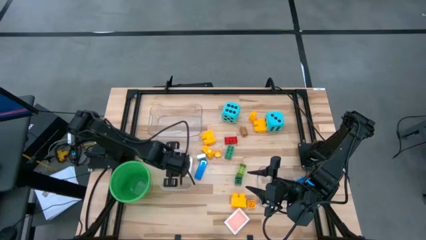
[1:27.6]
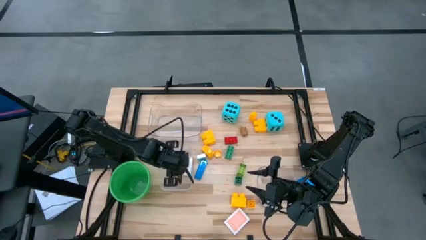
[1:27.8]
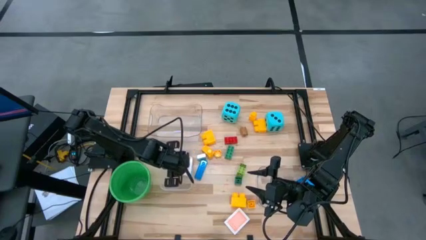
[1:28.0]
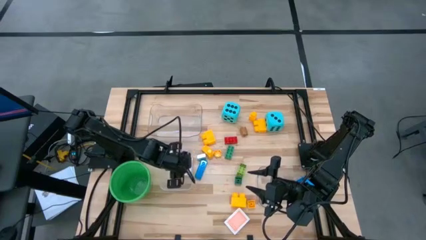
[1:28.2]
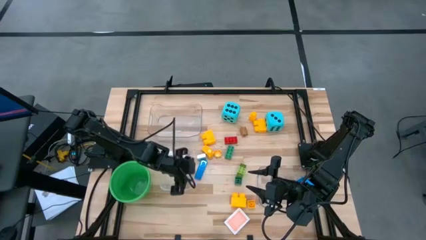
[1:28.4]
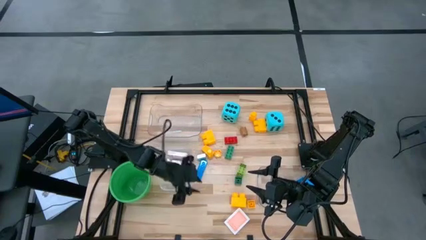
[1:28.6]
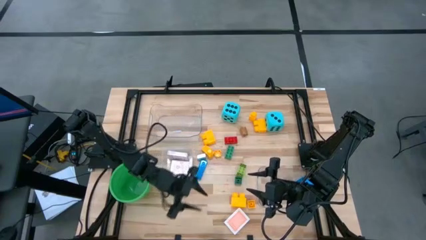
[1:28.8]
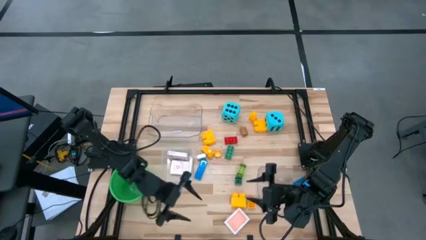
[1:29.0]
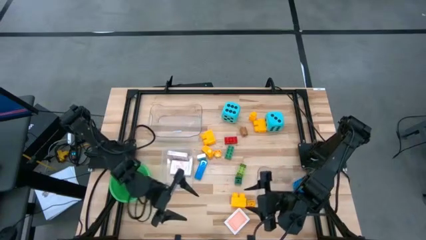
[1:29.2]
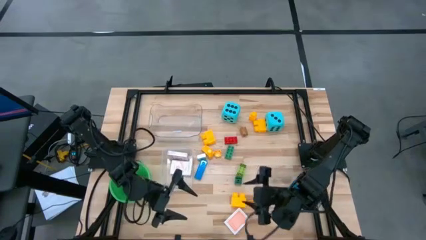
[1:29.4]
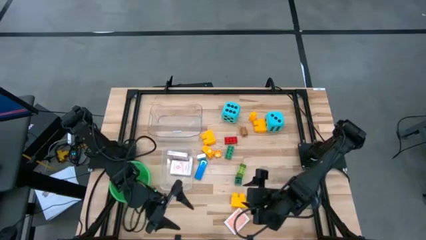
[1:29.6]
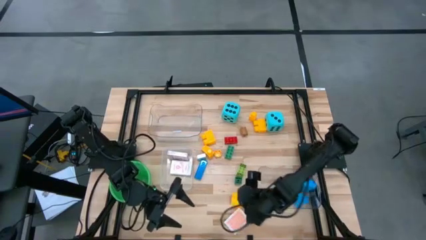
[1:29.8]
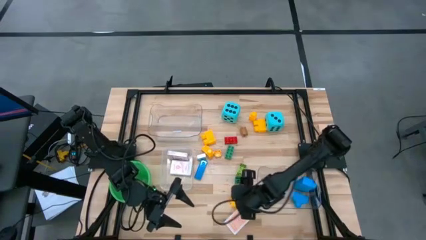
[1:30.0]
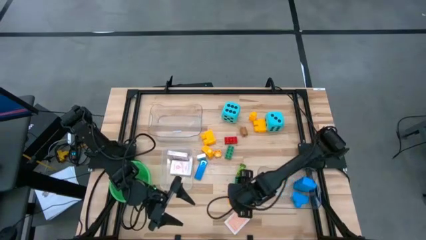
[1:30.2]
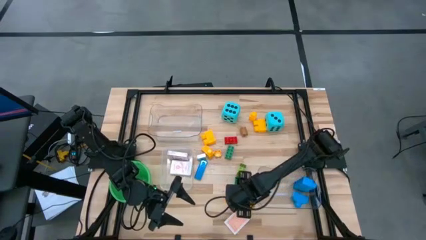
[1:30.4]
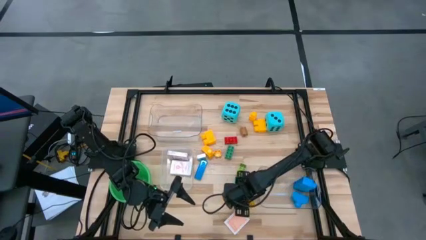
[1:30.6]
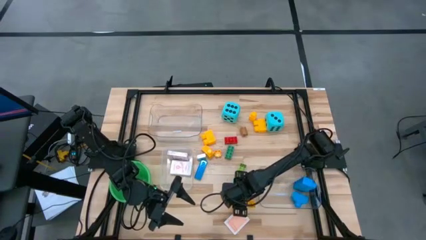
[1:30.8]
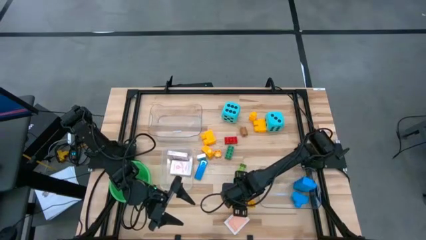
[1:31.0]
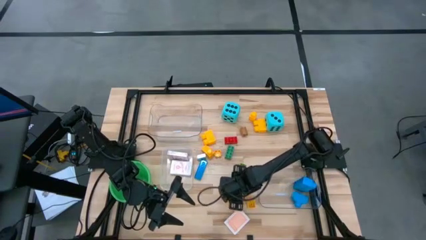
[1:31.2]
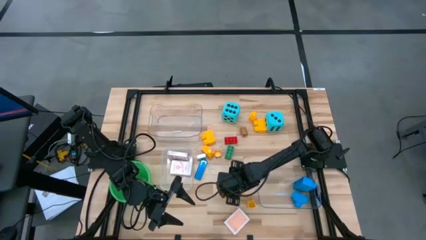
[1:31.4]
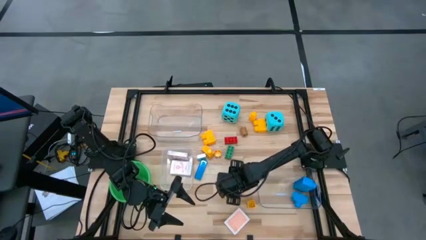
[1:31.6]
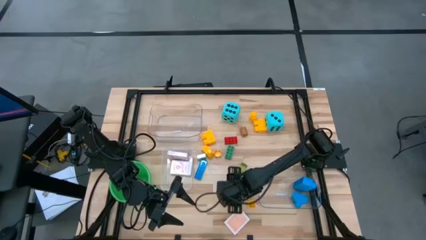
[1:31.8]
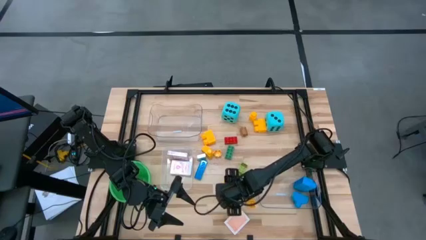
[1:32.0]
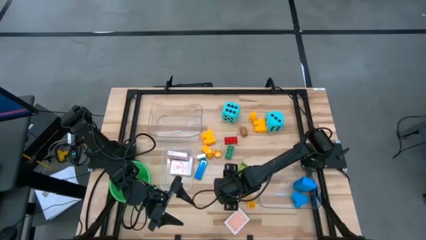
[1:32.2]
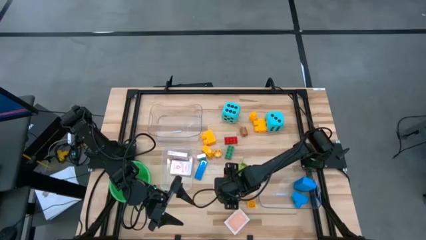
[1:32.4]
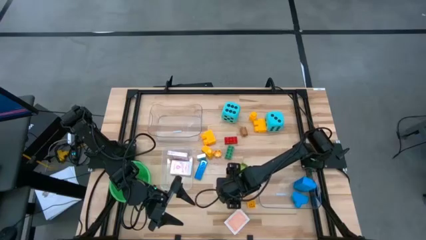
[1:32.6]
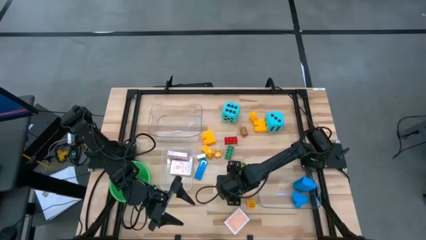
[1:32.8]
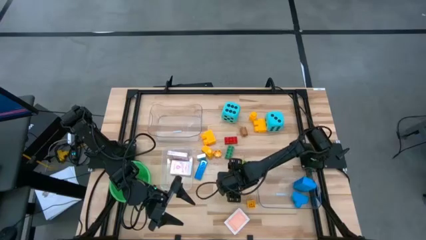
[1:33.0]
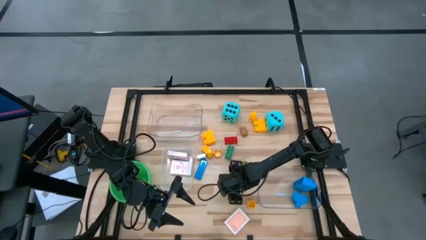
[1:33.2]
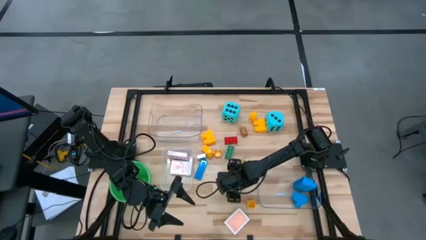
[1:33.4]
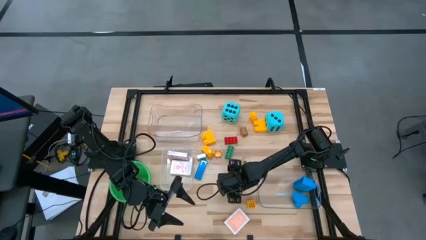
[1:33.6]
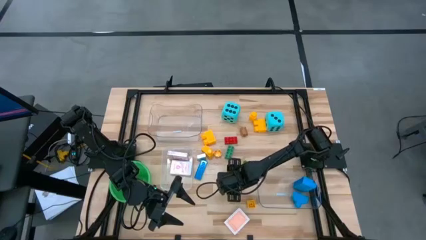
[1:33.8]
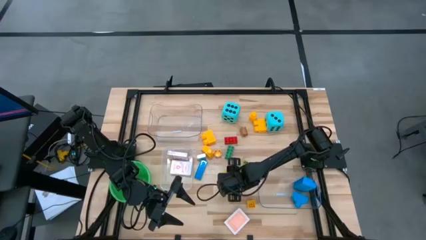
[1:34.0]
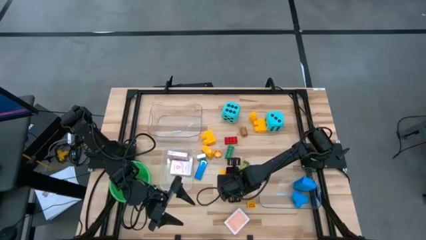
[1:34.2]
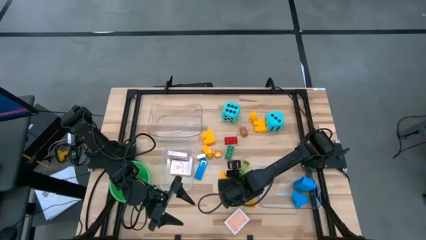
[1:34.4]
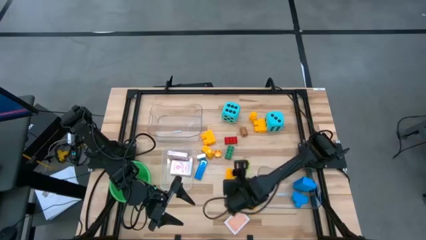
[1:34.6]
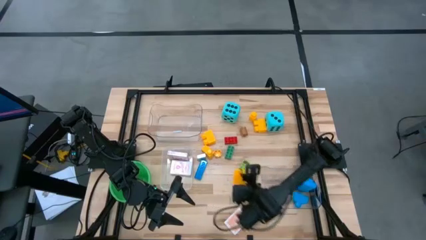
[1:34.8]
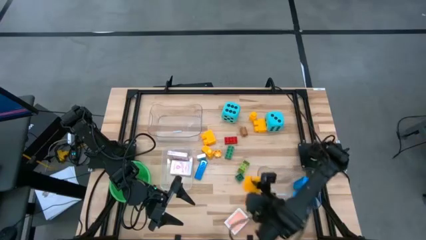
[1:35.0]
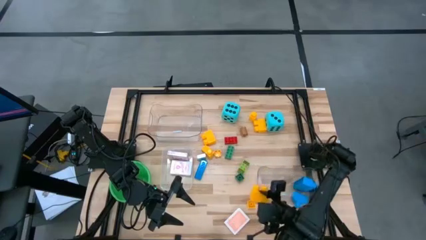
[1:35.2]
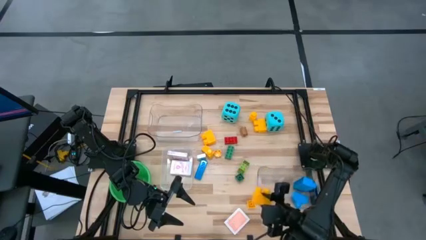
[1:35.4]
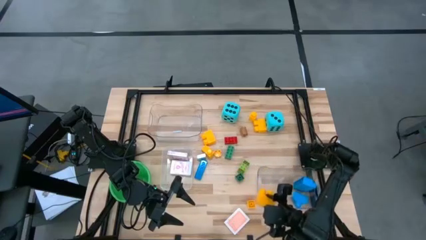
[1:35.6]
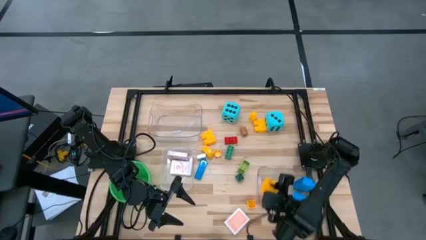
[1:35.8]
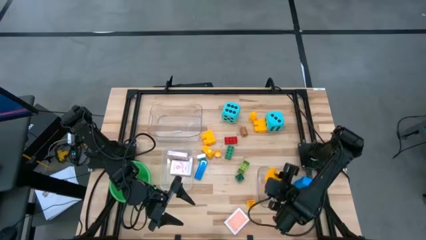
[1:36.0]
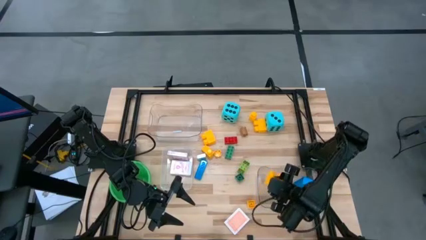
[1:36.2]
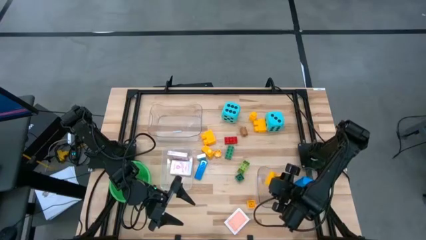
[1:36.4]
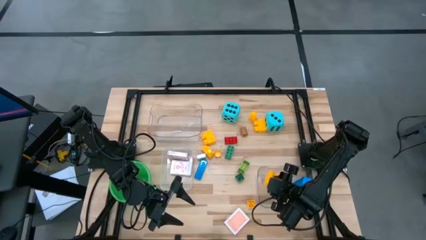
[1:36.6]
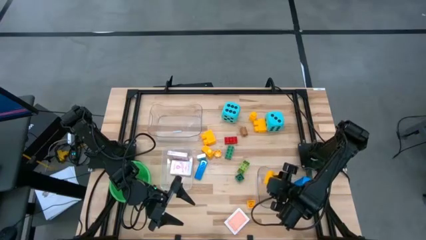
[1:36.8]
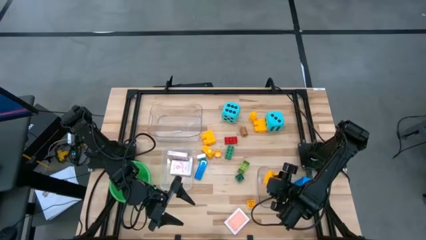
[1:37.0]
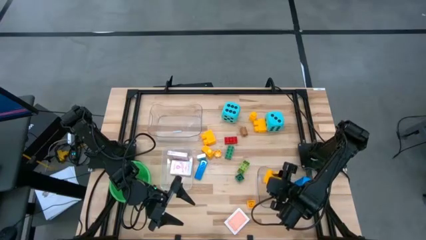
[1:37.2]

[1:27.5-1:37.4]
Task: Pick & Place Toys
Put the yellow game piece into the bottom right transparent bin

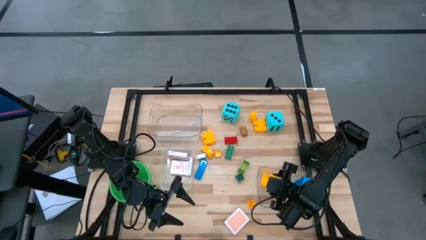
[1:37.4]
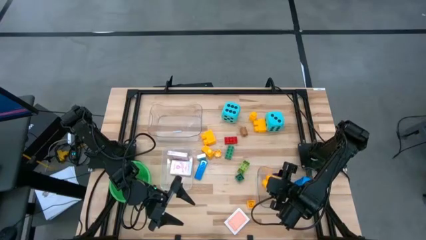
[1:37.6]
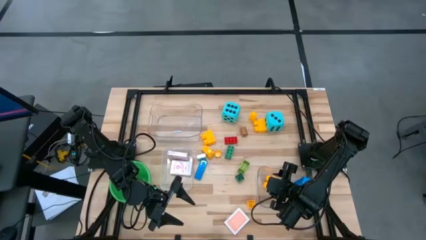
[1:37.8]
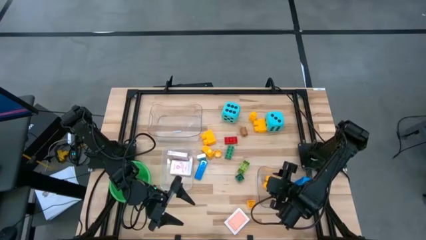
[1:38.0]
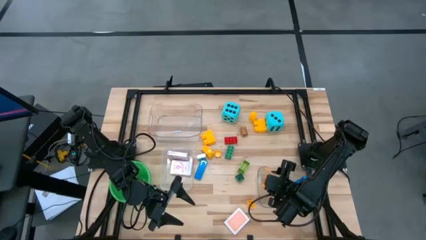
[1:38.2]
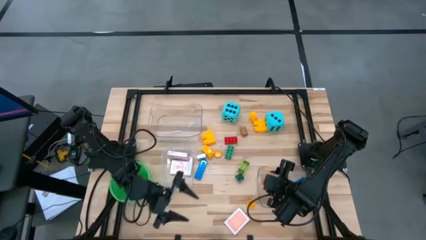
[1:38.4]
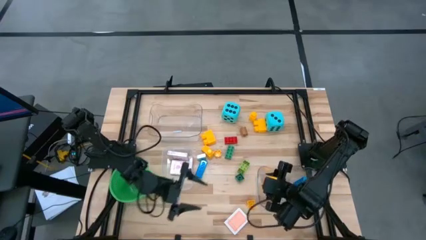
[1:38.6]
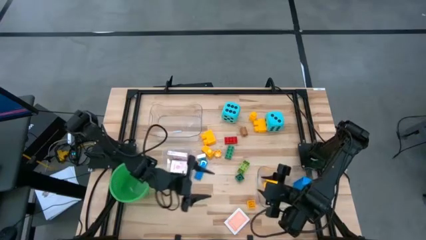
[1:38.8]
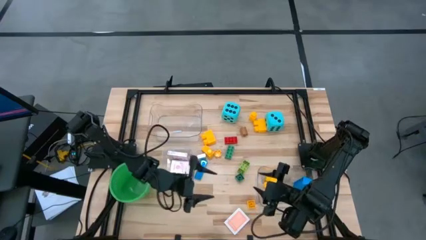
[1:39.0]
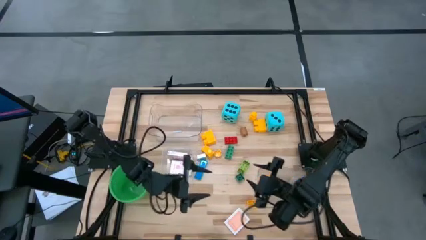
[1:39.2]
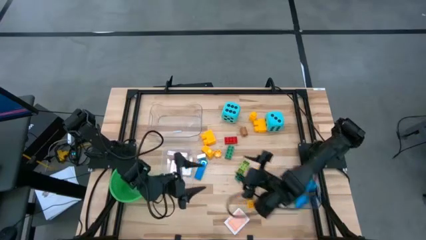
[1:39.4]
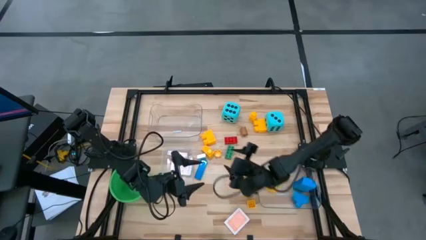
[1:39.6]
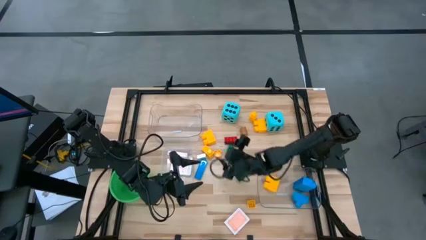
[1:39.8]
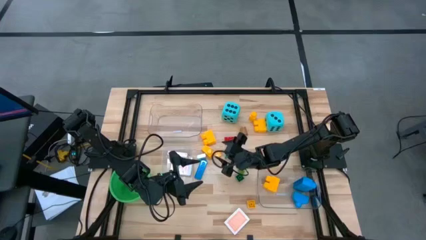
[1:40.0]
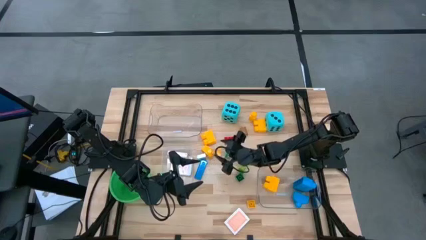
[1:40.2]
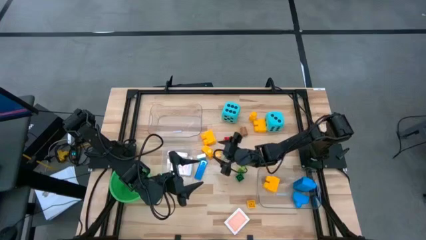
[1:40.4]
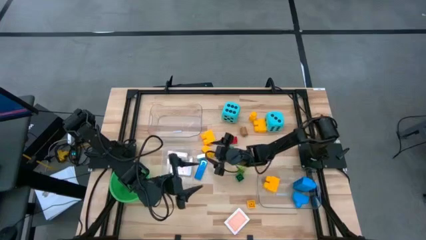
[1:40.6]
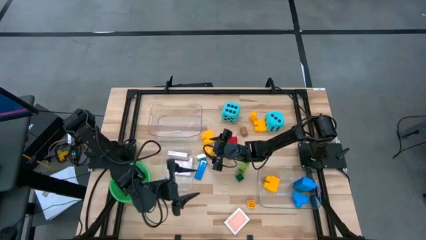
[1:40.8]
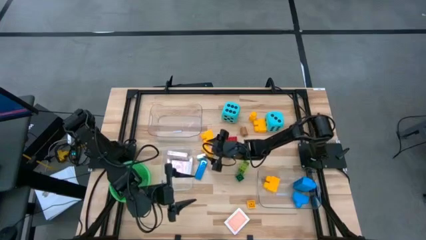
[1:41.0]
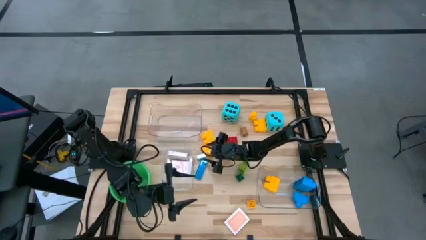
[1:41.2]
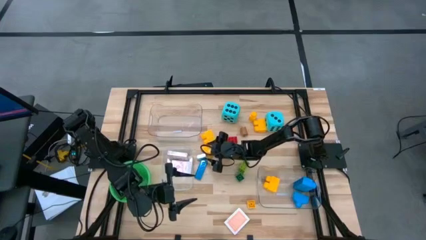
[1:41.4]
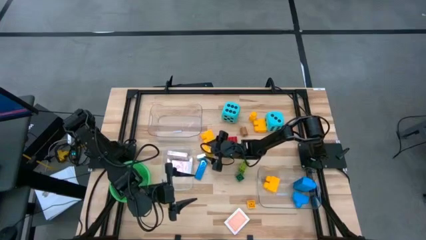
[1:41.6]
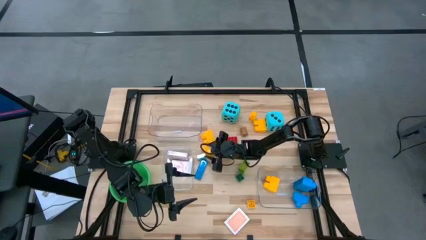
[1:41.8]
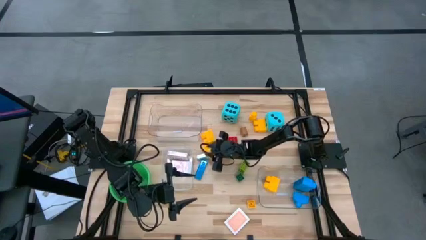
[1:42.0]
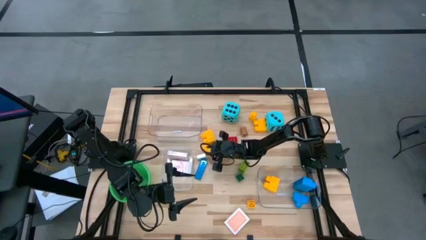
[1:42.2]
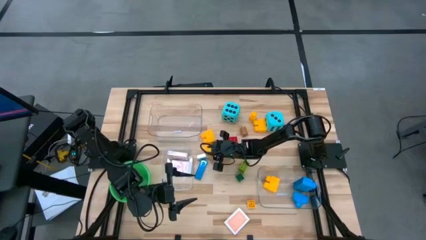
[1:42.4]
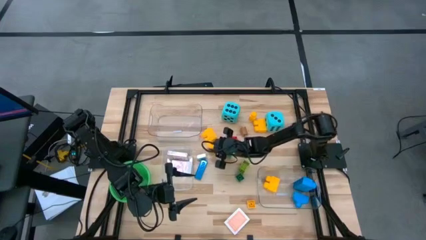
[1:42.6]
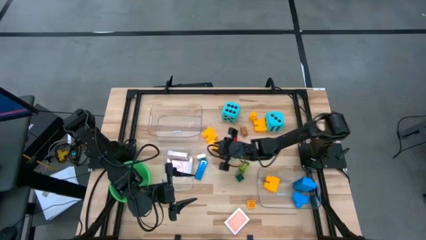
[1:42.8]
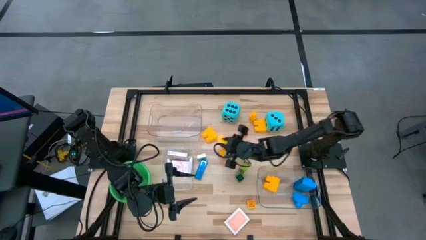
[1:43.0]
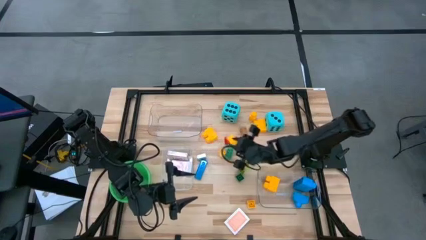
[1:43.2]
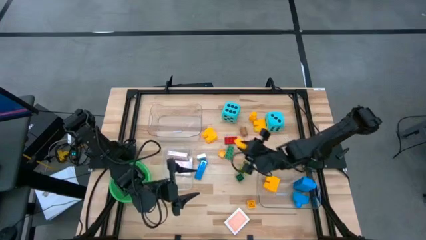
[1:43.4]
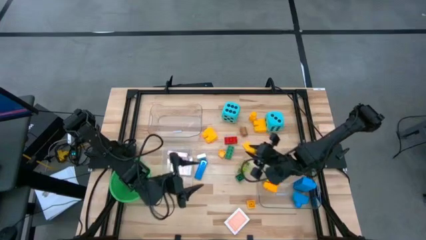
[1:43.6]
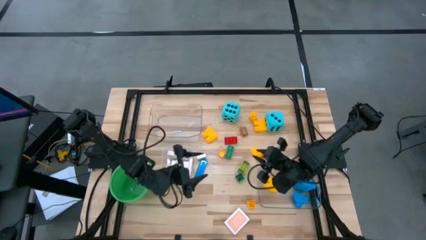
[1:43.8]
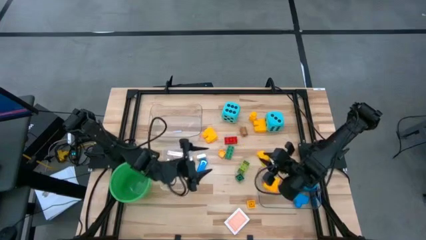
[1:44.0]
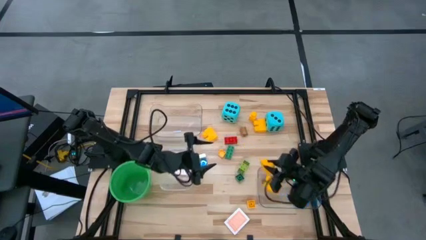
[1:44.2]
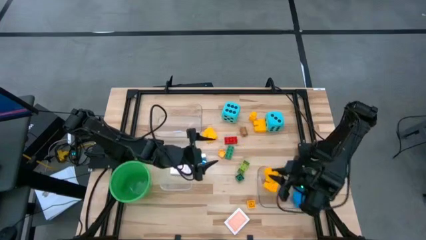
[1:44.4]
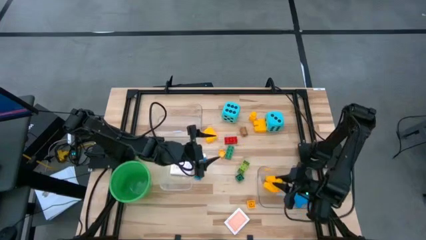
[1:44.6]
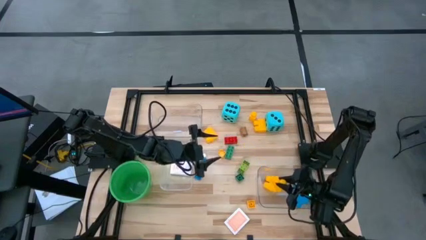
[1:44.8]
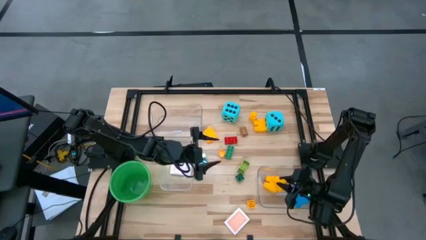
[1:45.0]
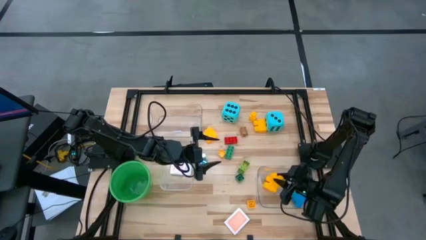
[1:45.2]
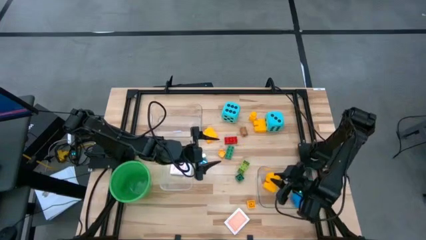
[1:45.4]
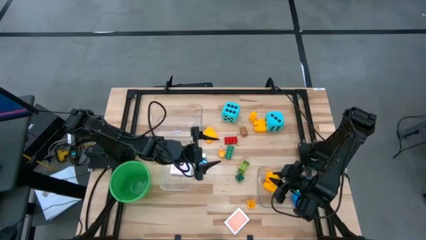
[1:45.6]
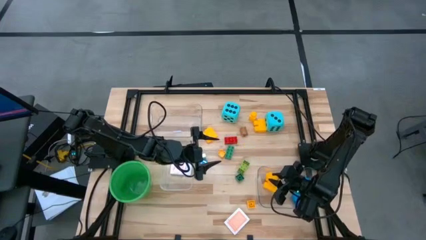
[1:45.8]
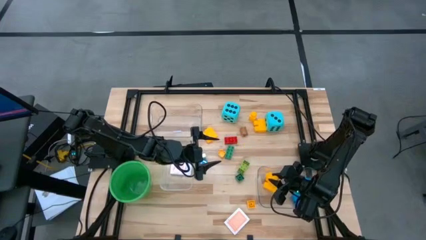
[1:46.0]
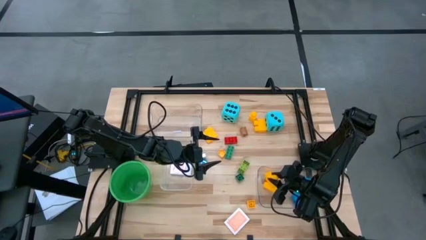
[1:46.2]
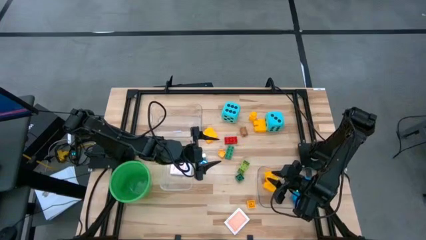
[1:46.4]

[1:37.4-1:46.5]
Put the yellow game piece into the bottom right transparent bin
